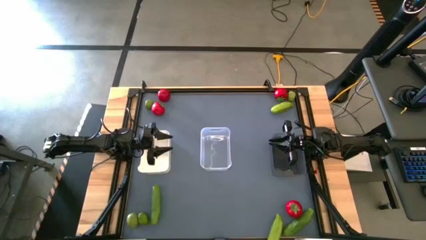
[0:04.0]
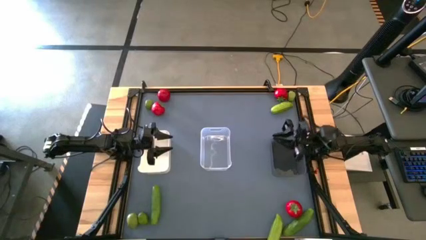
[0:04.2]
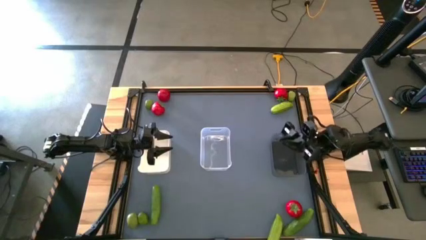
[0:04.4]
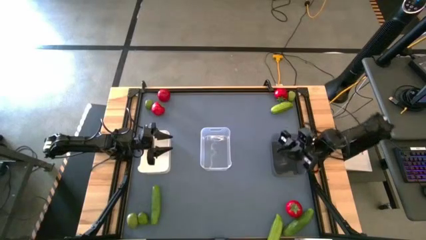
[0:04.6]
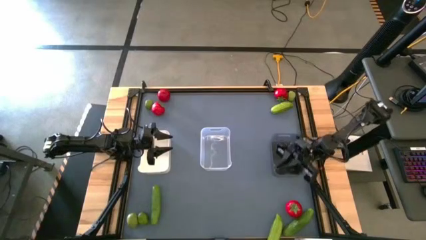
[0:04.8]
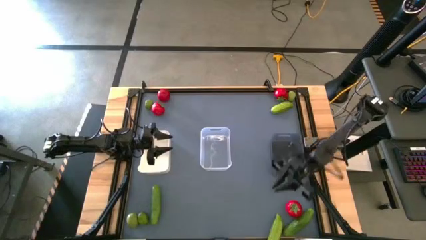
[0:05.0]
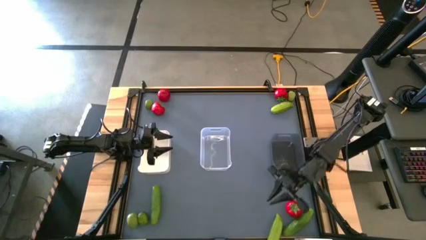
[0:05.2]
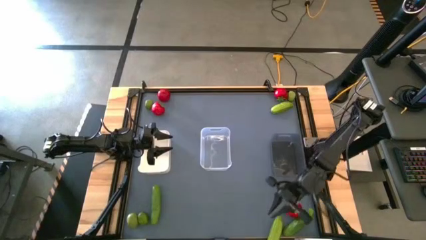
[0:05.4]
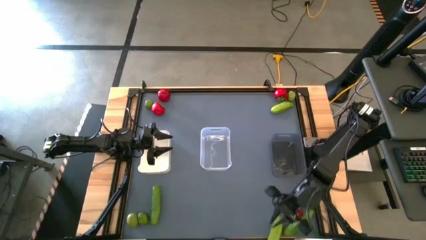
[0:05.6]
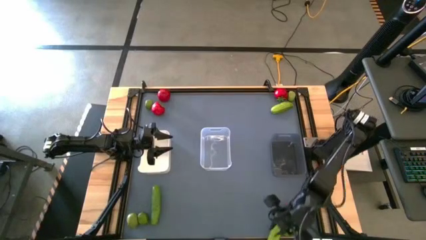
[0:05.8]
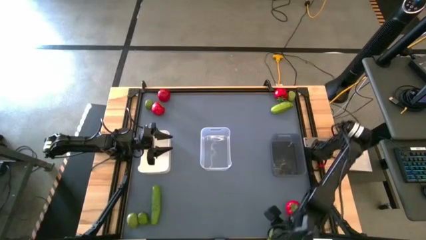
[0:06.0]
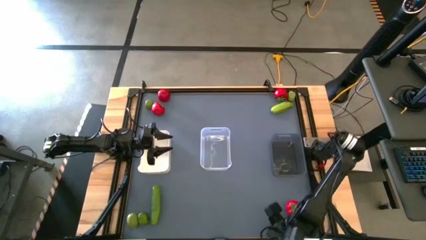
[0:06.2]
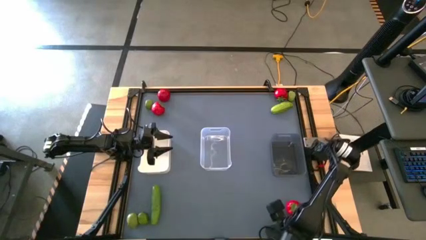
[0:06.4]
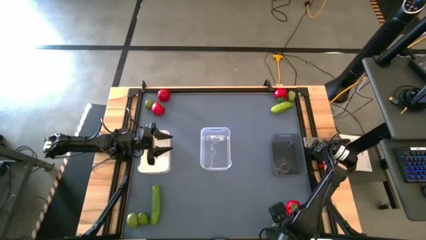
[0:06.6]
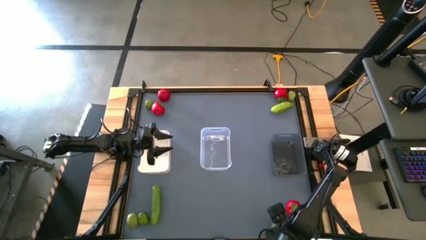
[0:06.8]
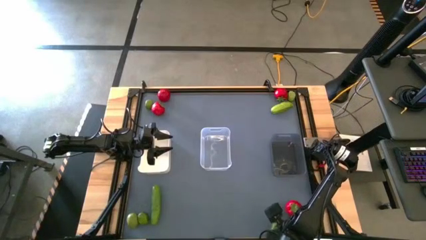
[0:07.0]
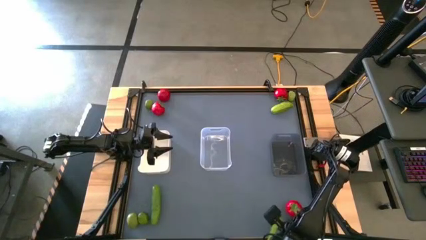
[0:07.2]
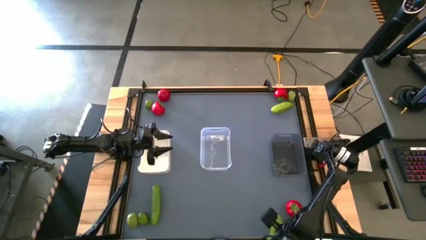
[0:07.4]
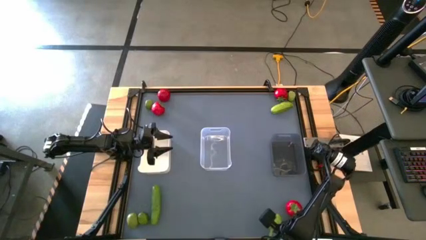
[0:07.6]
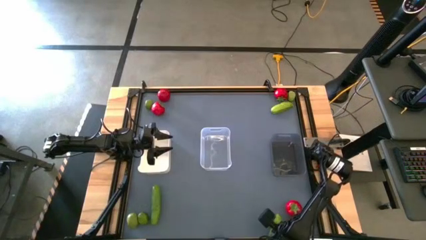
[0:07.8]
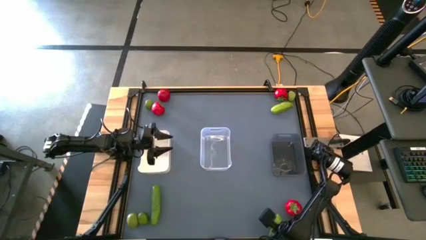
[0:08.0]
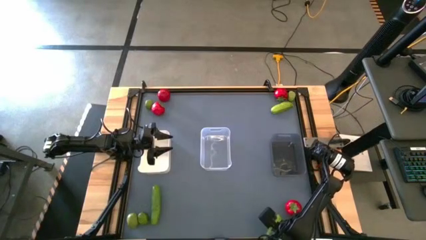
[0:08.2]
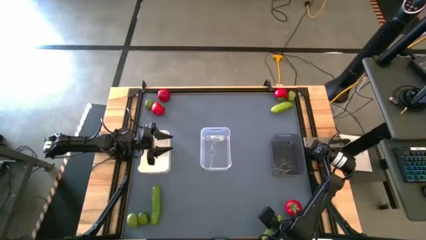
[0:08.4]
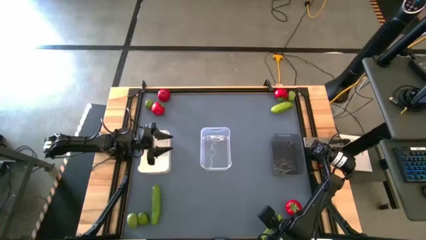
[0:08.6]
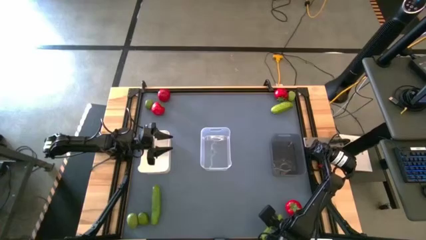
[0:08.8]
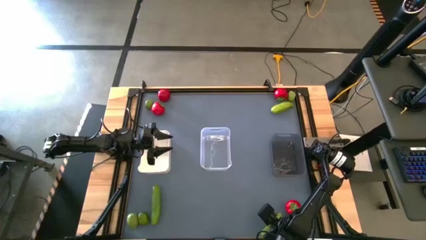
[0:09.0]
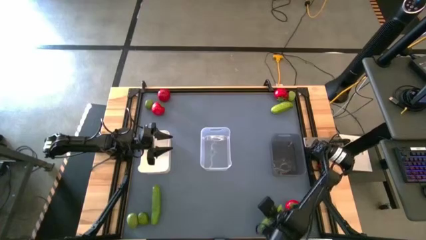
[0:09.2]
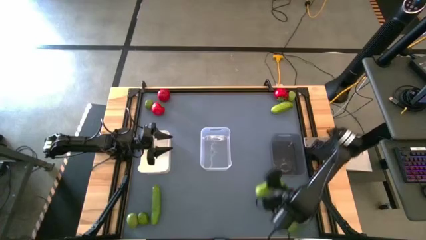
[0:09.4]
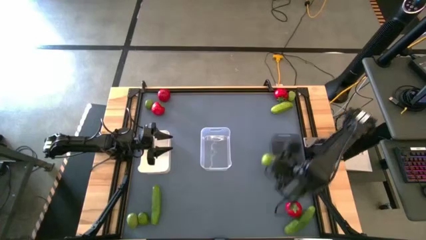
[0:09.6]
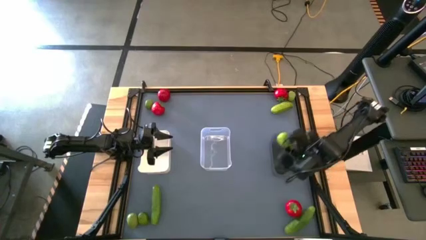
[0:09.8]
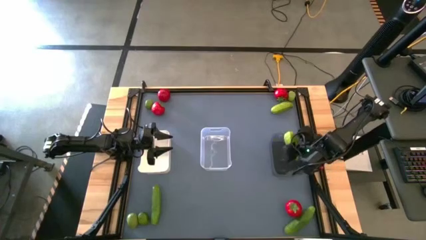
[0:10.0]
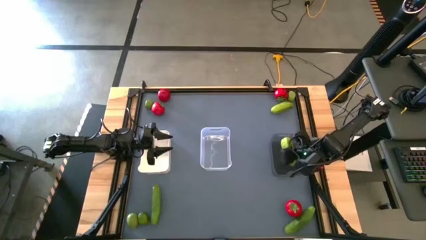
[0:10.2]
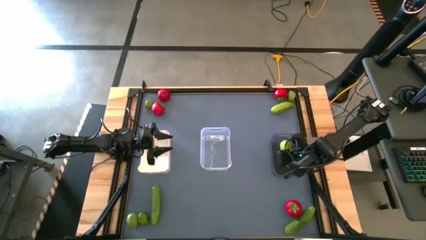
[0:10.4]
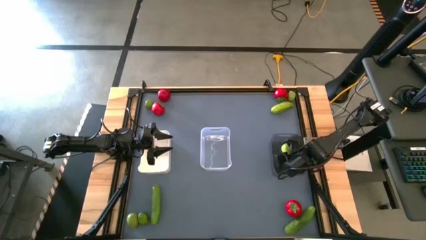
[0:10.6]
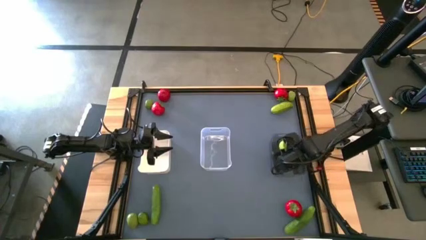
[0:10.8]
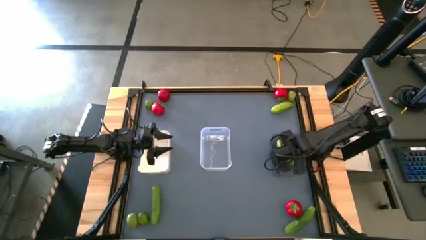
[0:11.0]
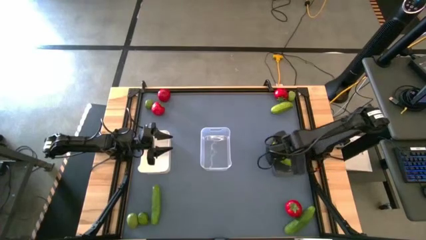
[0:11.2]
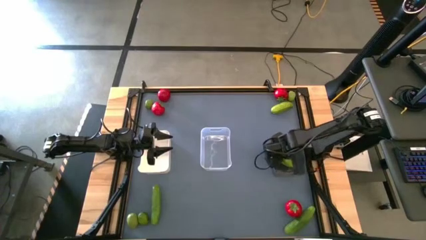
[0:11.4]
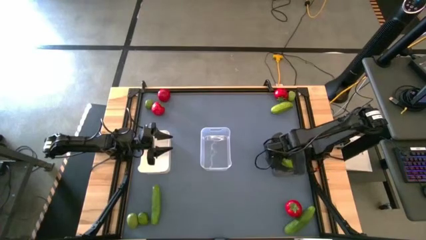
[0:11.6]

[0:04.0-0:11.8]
Task: Sort produce into baskets
Put the green cucumber into the black bin

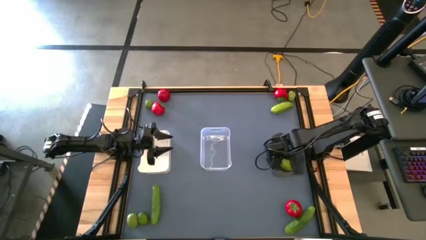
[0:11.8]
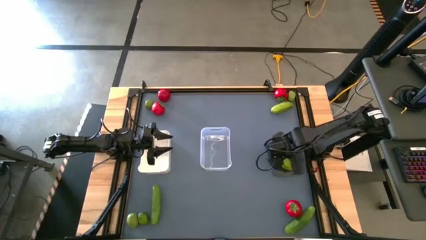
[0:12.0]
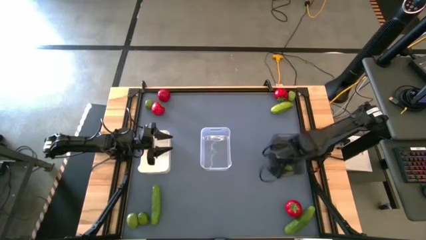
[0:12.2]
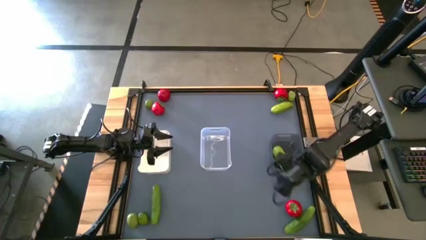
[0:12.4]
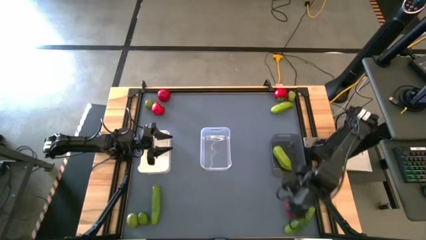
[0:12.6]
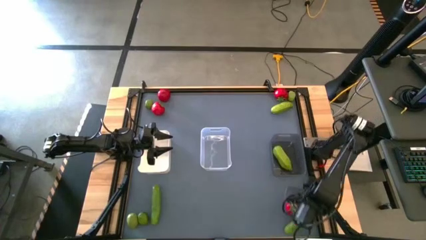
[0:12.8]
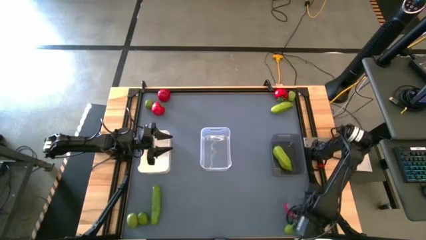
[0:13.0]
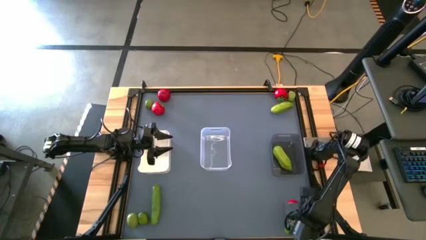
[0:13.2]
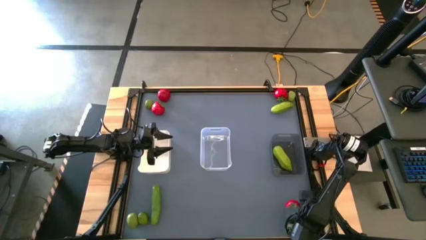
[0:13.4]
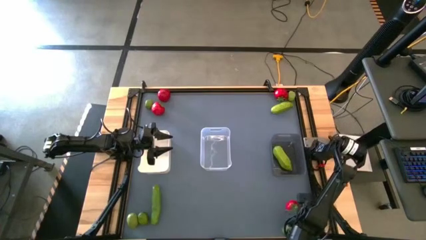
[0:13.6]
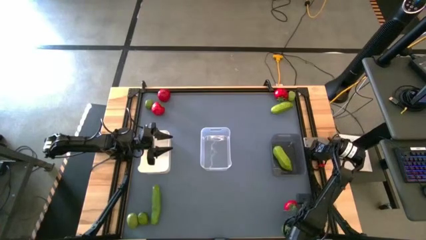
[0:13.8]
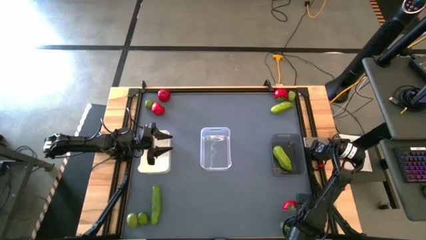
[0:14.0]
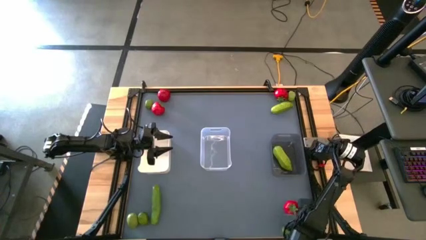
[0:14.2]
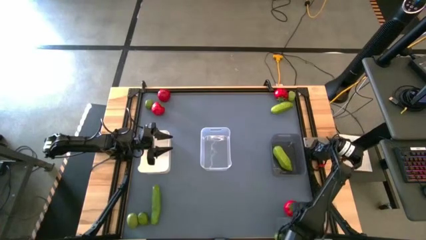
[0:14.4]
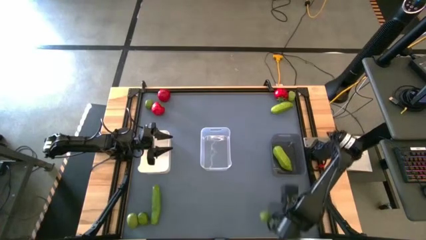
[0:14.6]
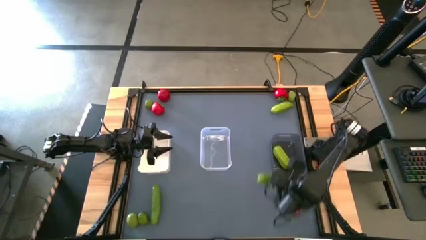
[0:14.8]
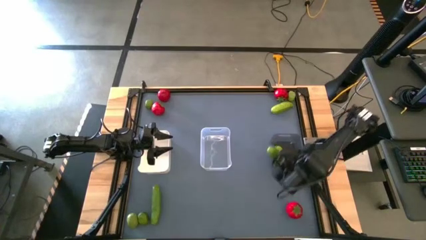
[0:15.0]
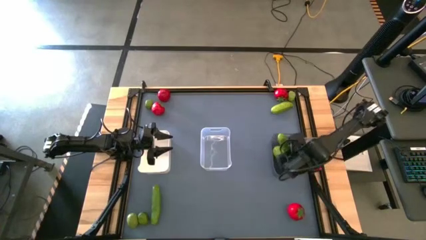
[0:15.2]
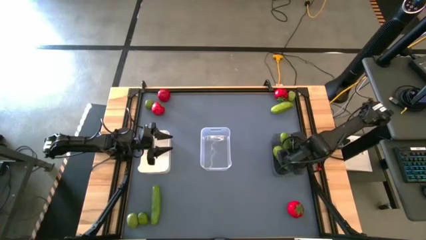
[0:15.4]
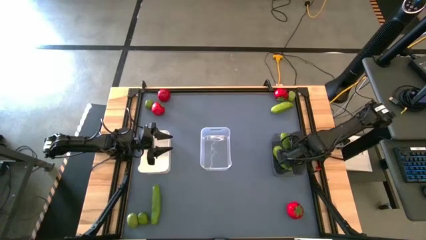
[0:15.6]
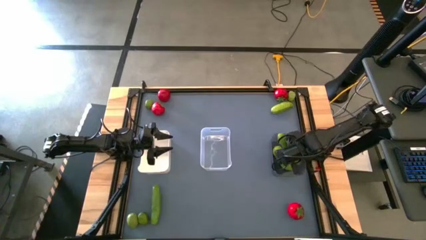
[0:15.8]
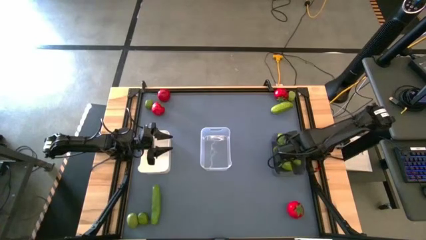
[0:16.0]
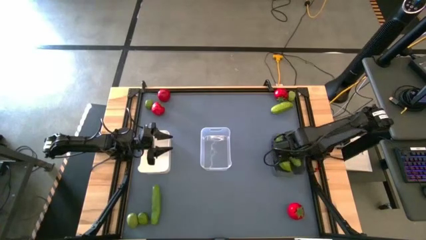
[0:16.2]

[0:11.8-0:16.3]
Put the green cucumber into the black bin

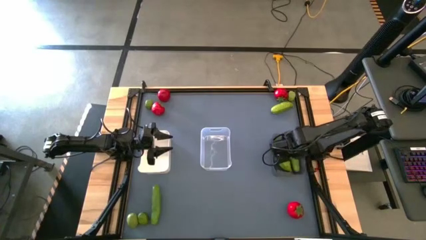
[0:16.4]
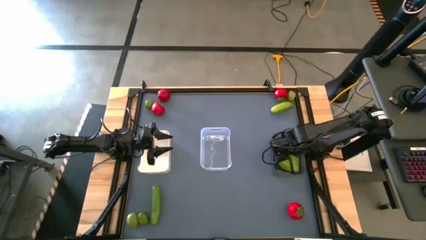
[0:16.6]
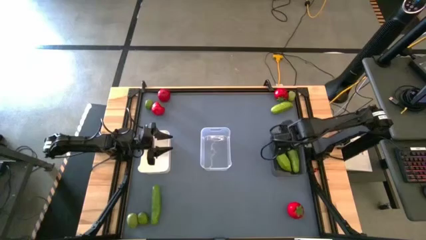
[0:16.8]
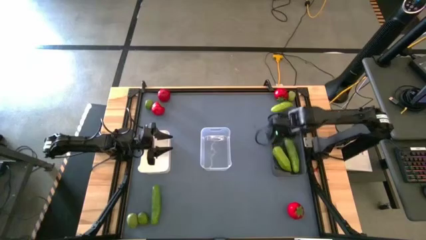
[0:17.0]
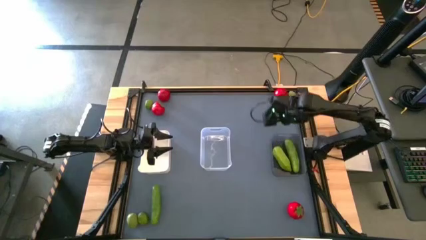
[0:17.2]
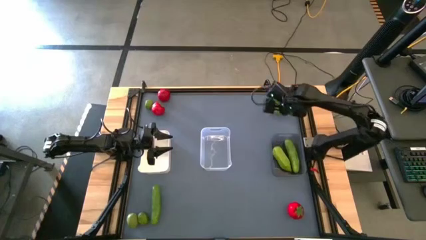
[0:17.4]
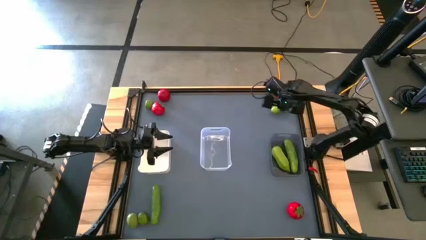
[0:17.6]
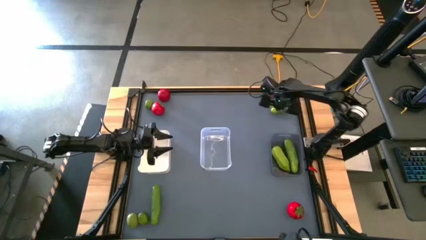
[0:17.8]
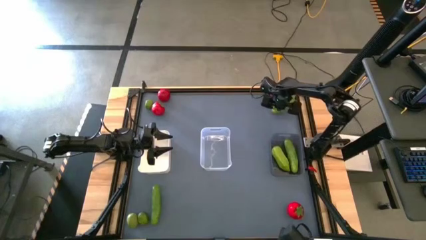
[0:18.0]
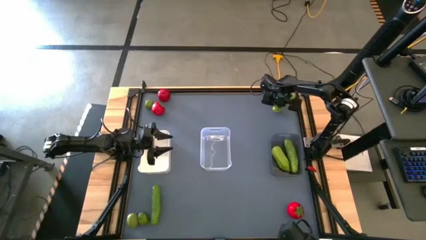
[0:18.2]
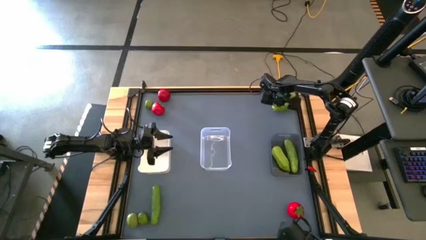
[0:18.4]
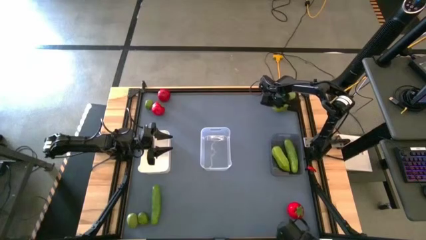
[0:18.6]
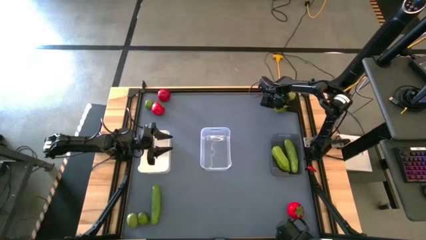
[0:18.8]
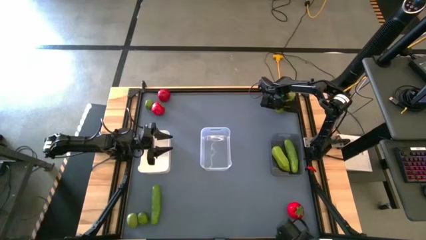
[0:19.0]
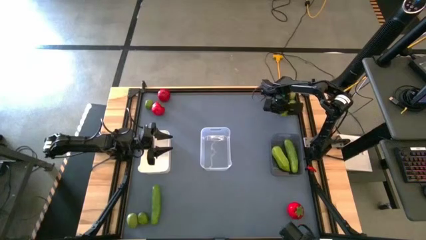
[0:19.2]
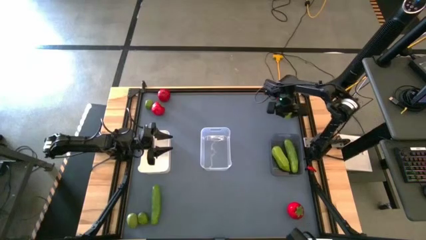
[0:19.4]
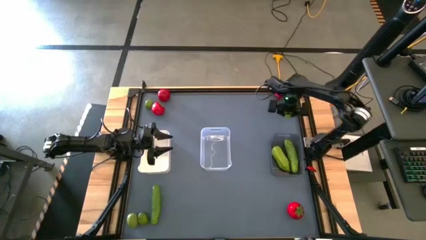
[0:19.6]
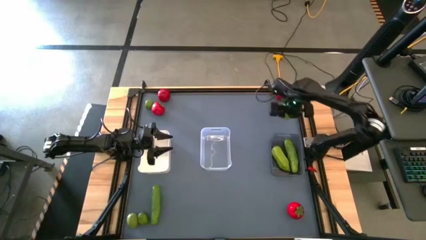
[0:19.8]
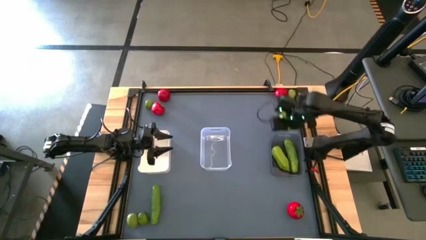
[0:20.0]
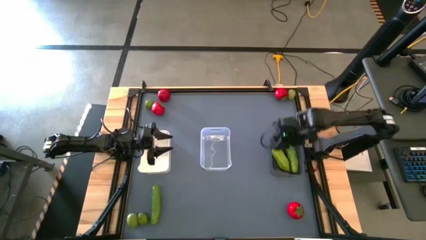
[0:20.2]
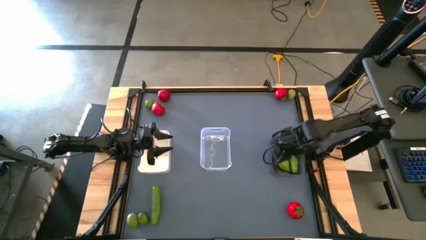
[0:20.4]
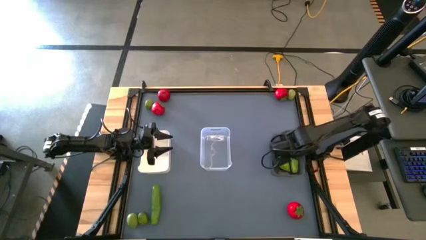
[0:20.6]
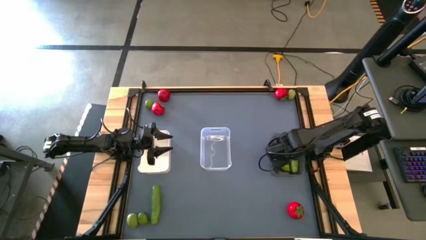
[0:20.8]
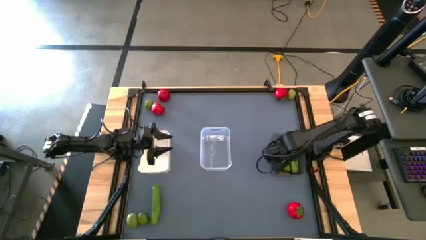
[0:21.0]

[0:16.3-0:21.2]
Put the green cucumber into the black bin
